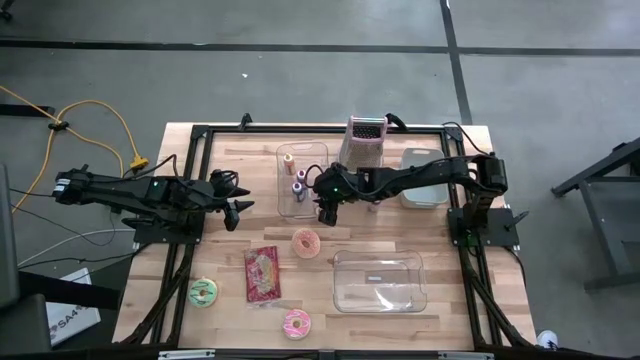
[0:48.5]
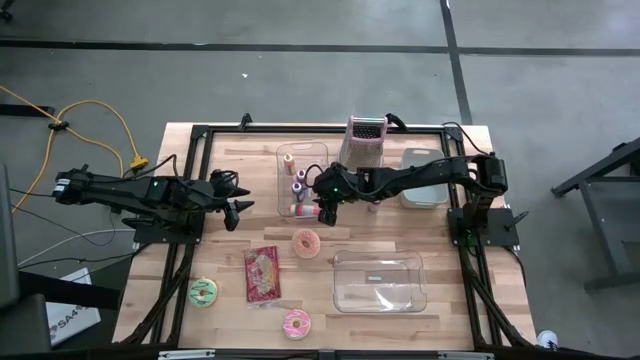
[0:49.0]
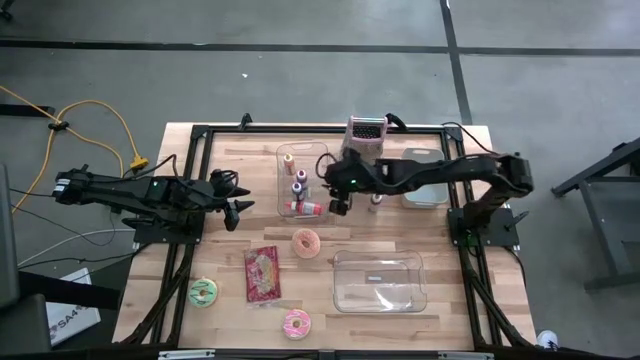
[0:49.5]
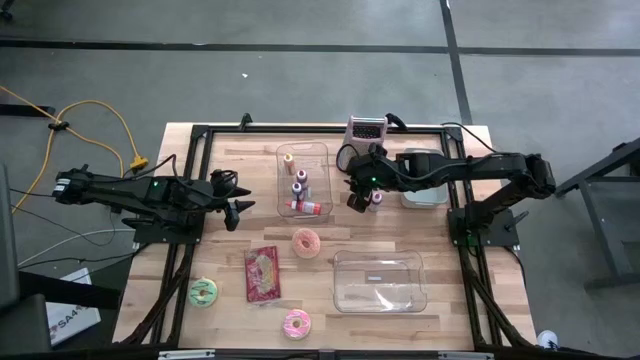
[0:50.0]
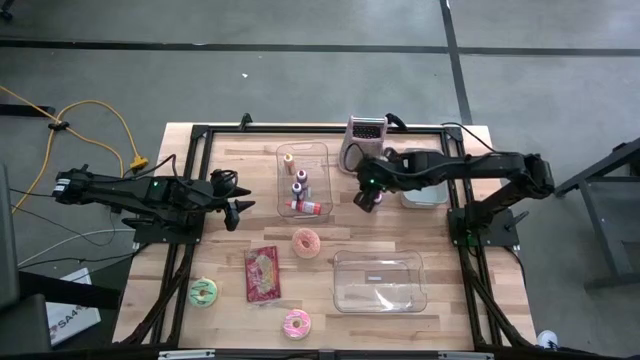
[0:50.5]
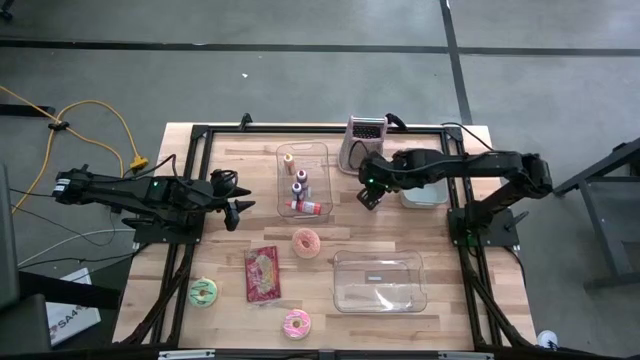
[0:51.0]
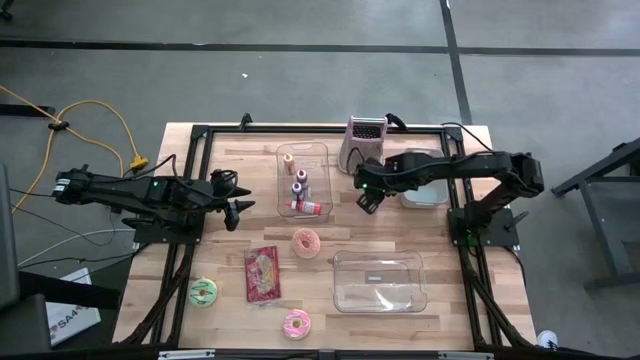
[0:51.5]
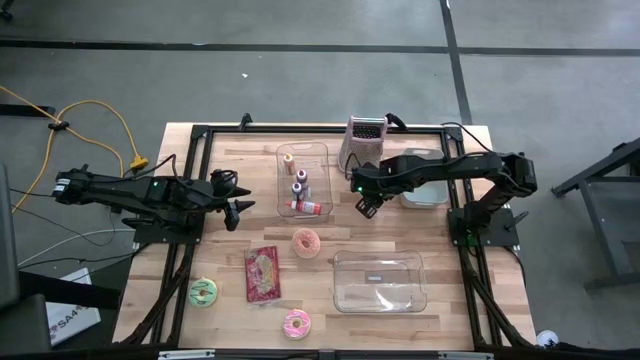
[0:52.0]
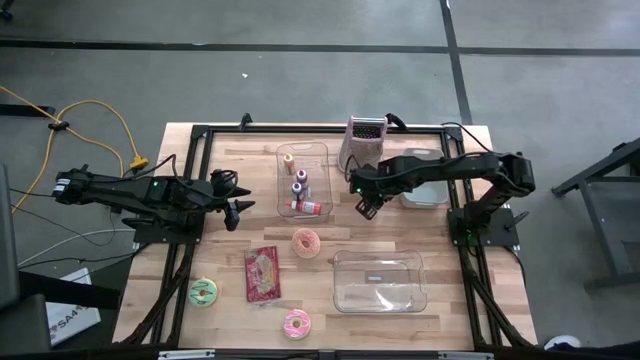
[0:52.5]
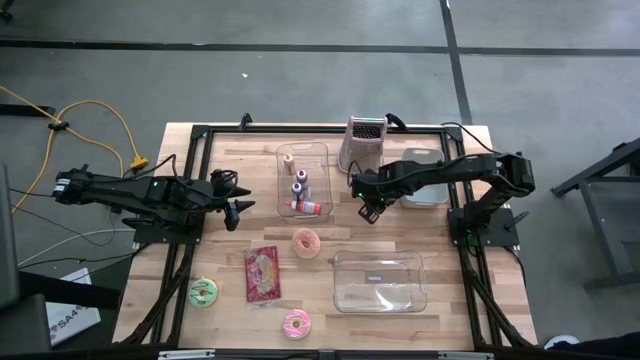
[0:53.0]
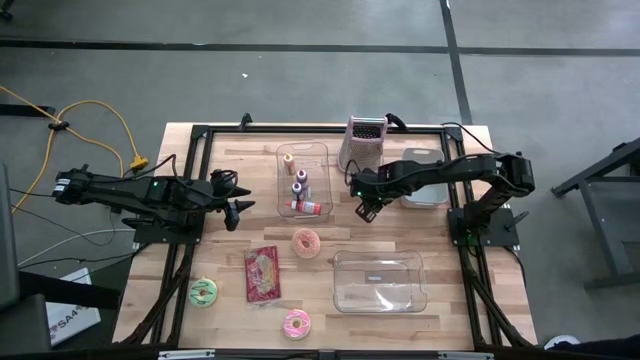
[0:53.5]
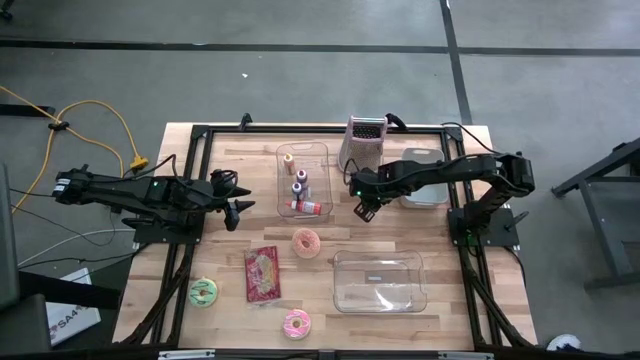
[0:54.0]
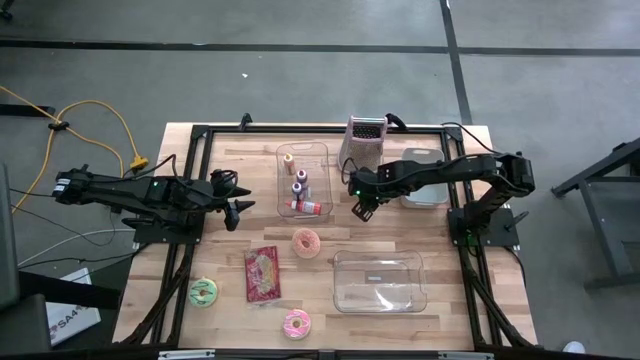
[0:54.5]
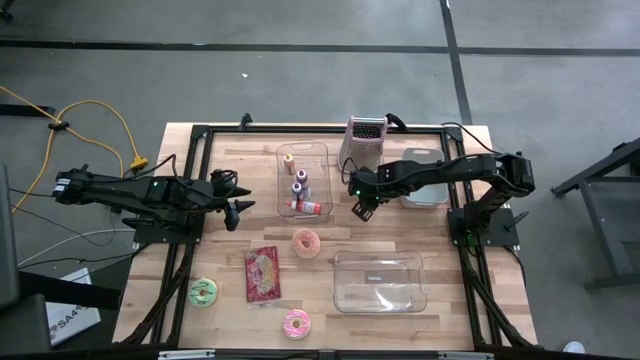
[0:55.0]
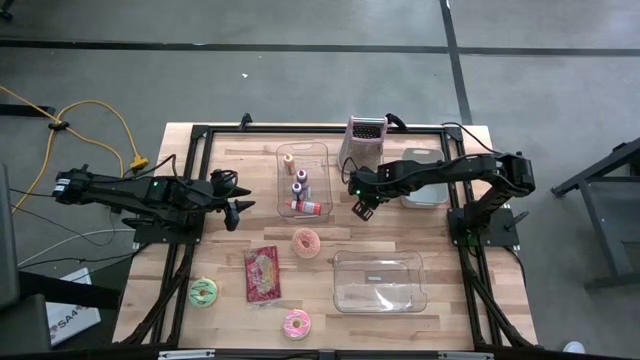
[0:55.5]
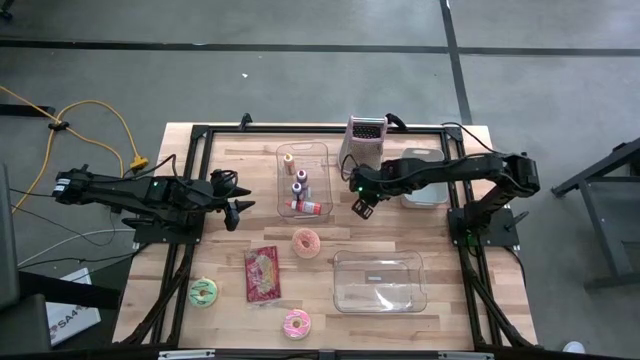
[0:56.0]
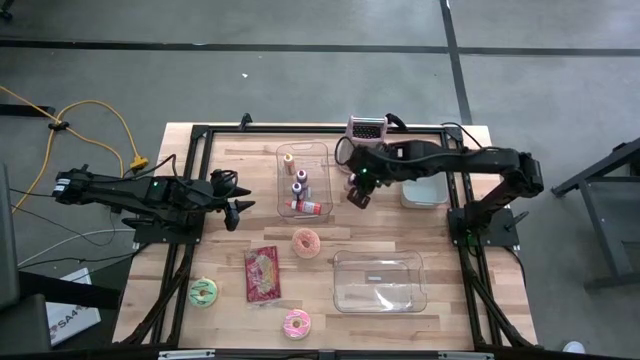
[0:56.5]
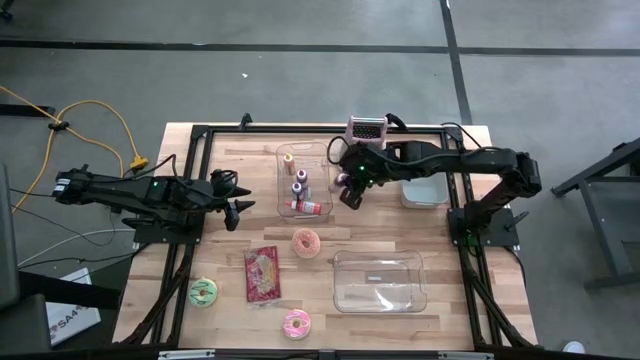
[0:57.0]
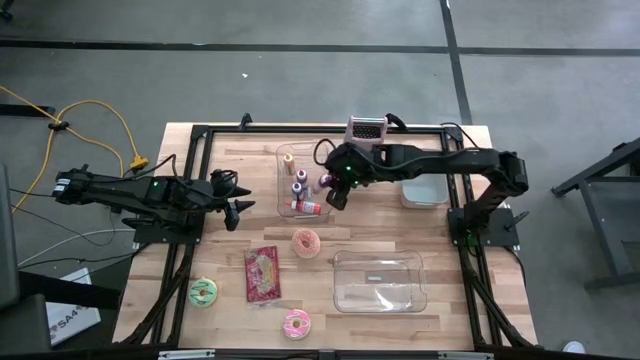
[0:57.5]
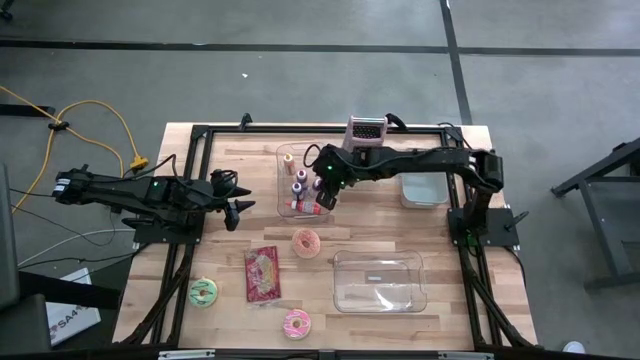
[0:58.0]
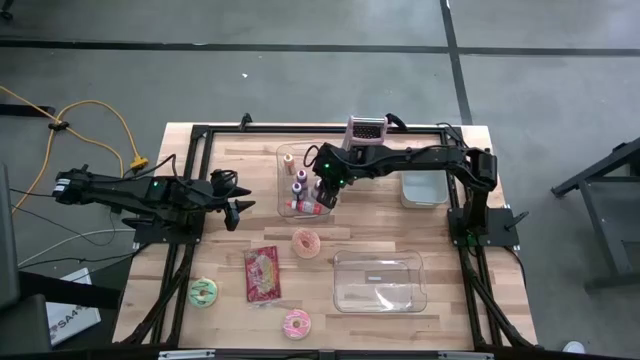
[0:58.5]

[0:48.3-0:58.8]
Put the red food coloring bottle into the top transparent bin
